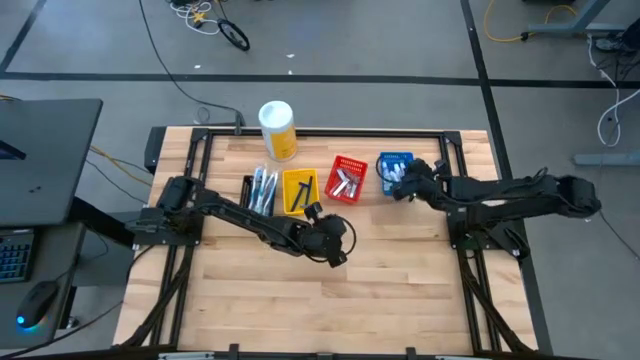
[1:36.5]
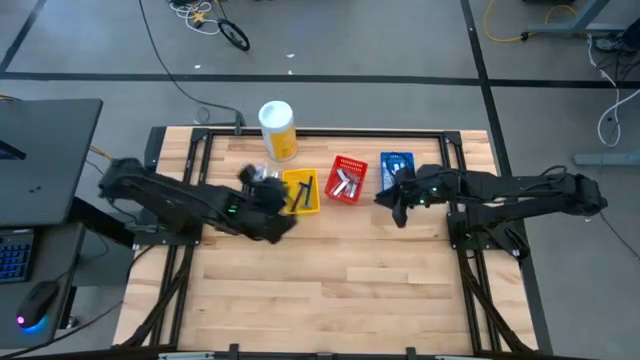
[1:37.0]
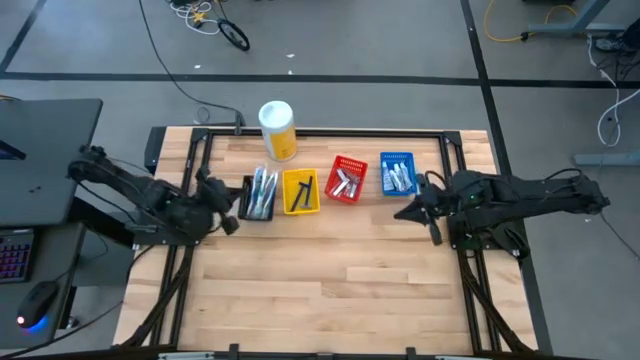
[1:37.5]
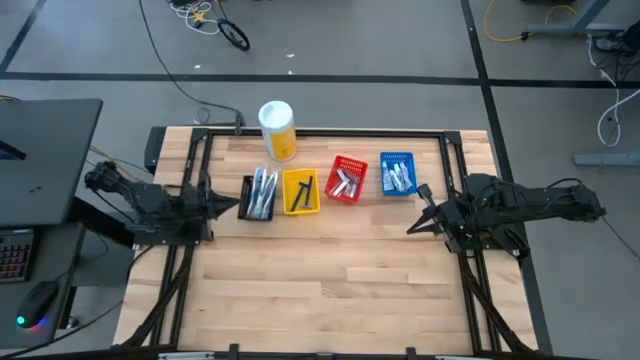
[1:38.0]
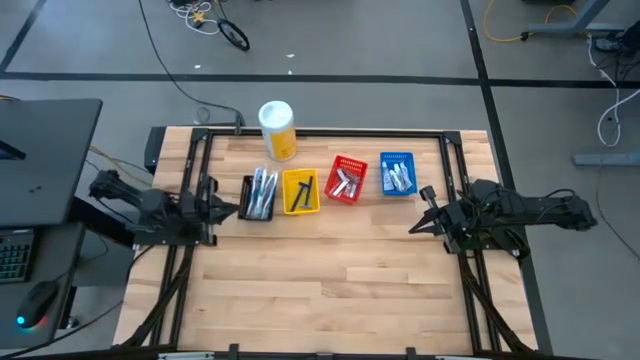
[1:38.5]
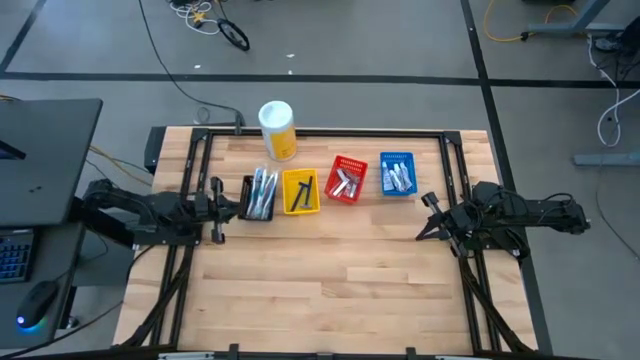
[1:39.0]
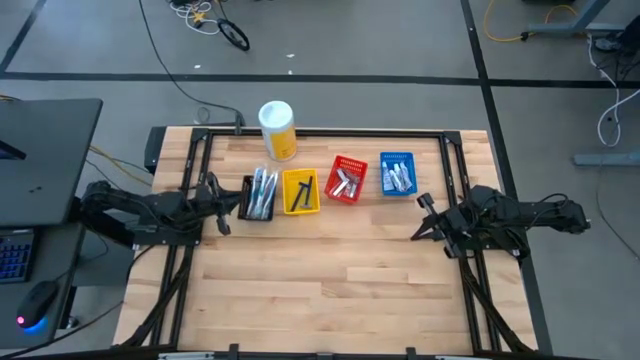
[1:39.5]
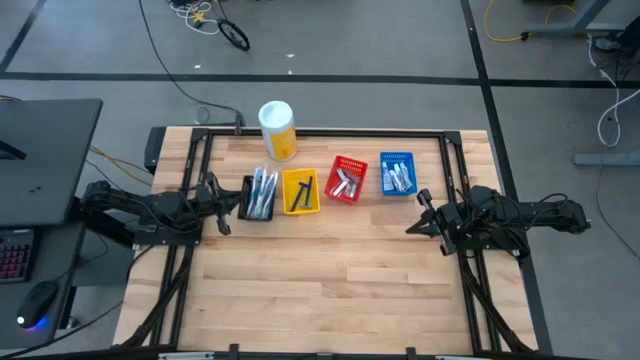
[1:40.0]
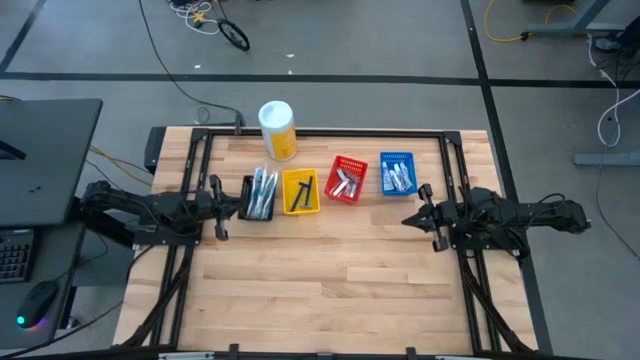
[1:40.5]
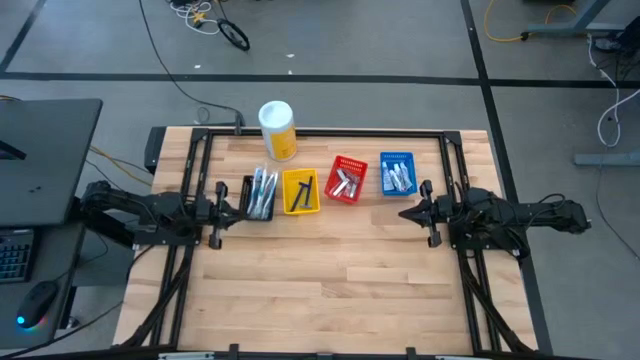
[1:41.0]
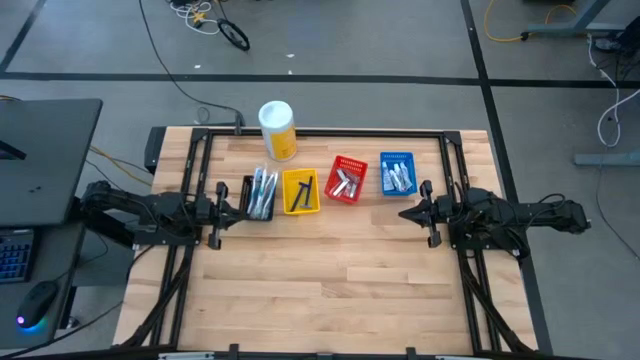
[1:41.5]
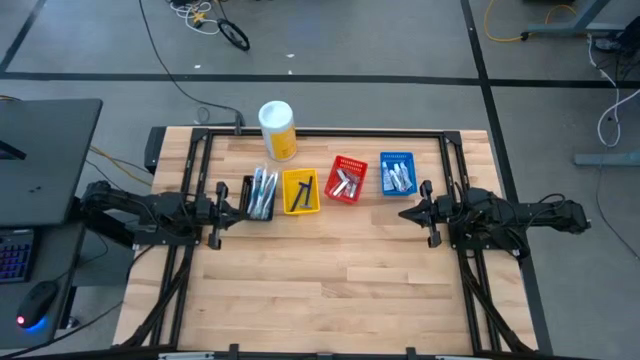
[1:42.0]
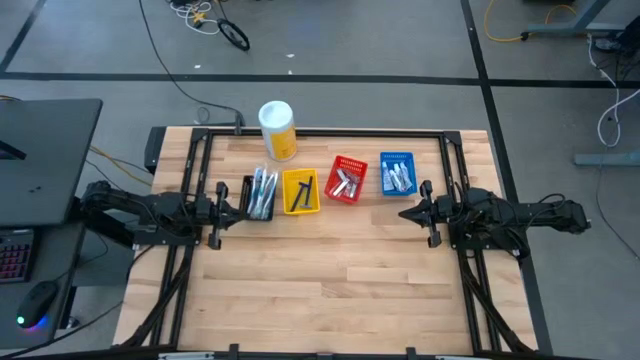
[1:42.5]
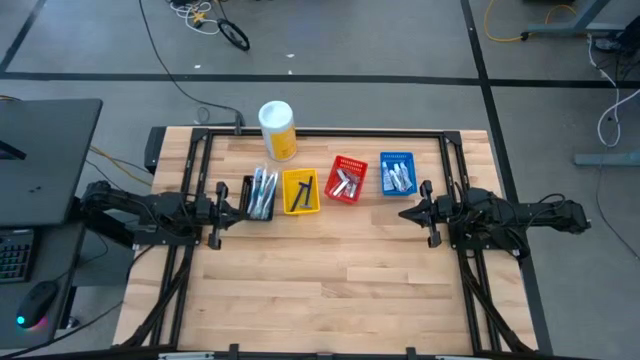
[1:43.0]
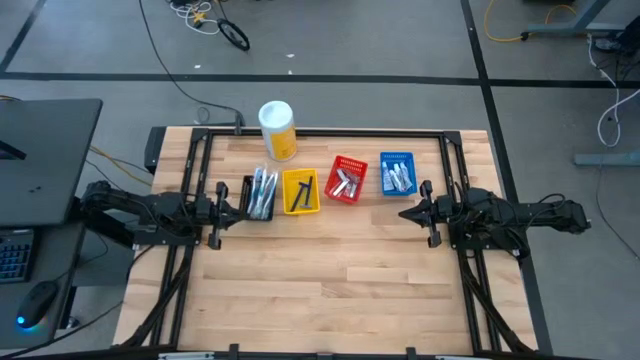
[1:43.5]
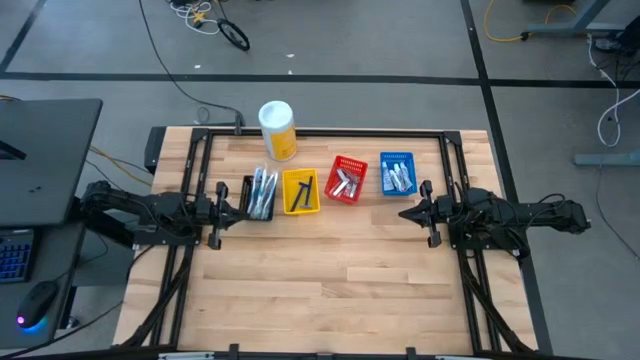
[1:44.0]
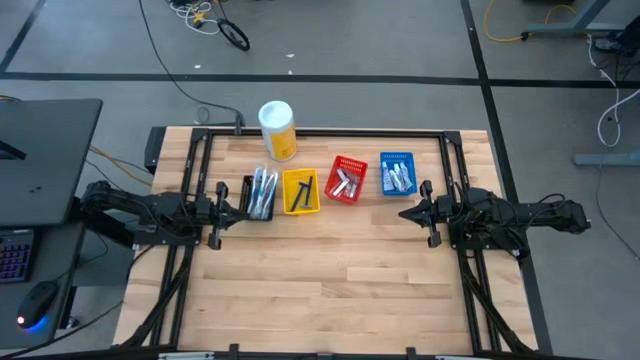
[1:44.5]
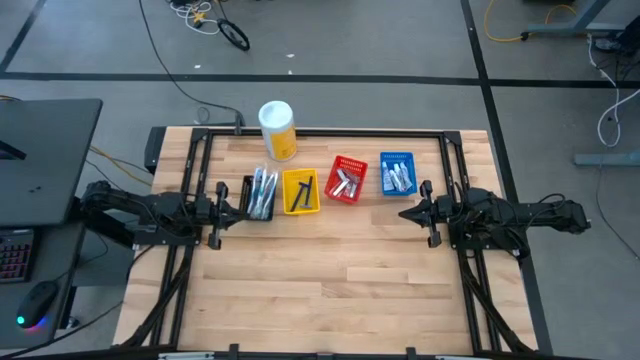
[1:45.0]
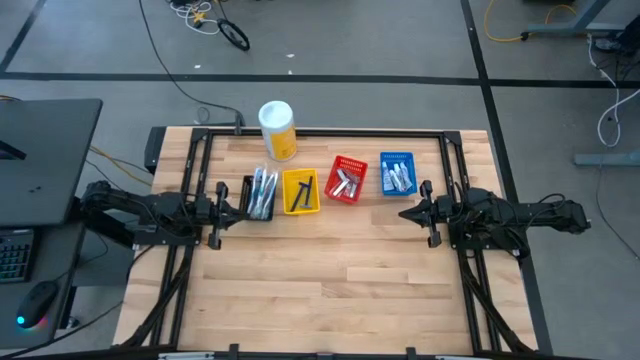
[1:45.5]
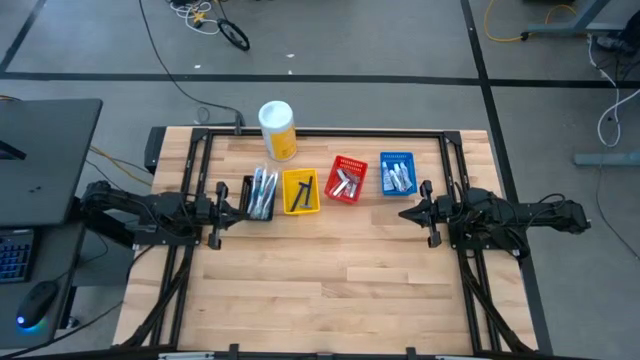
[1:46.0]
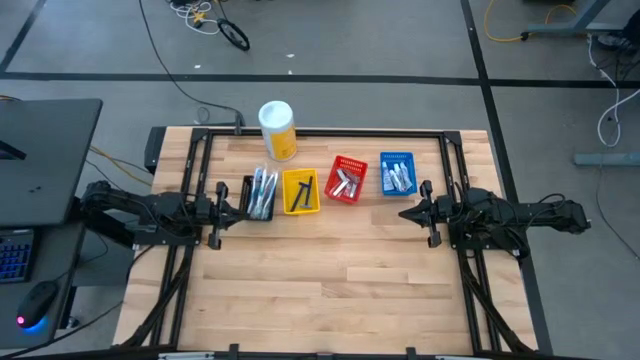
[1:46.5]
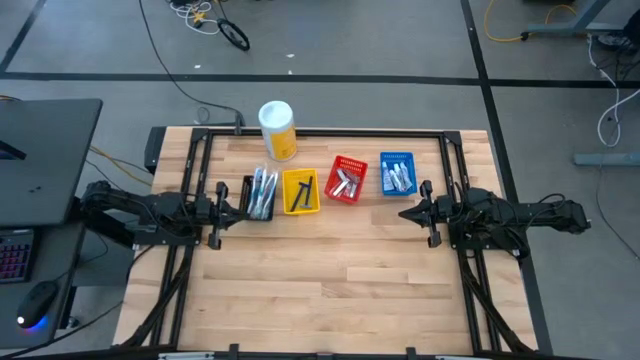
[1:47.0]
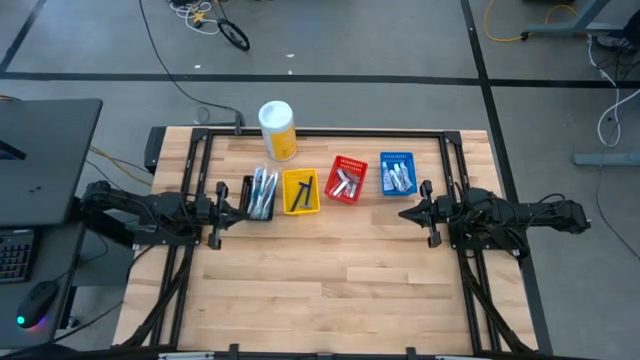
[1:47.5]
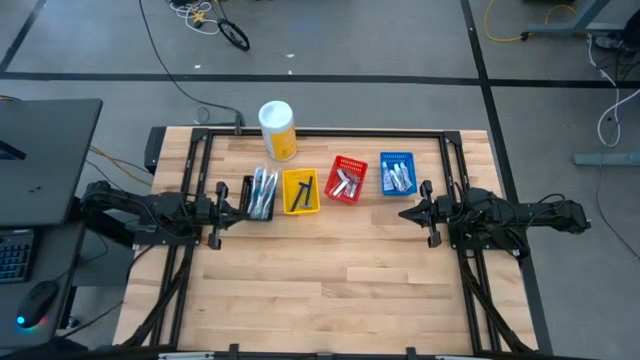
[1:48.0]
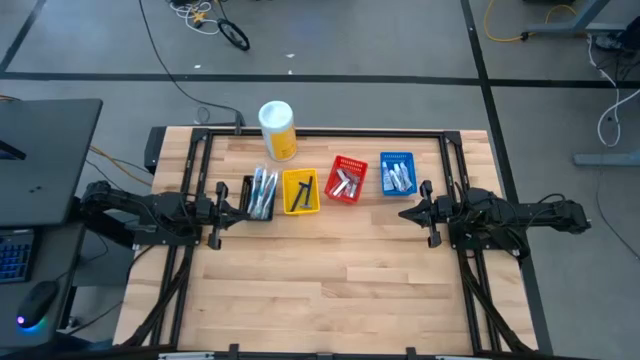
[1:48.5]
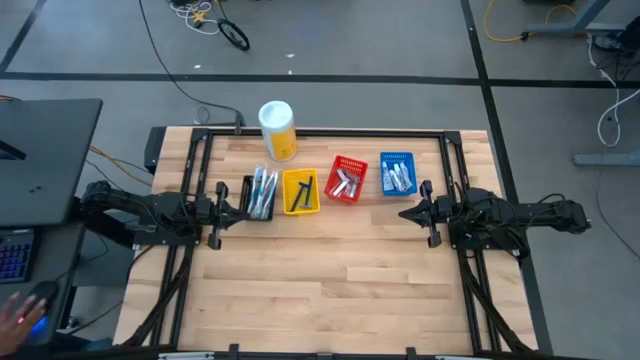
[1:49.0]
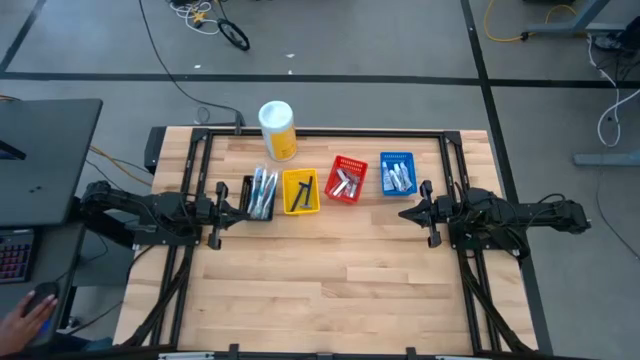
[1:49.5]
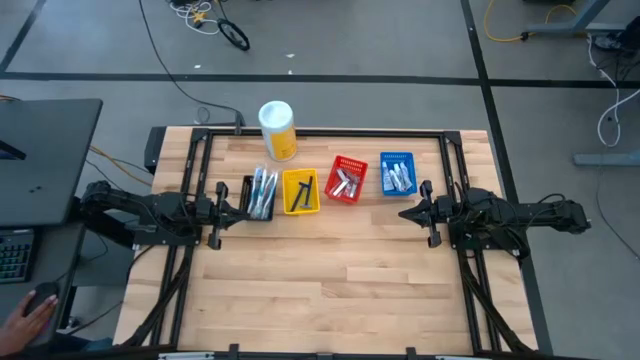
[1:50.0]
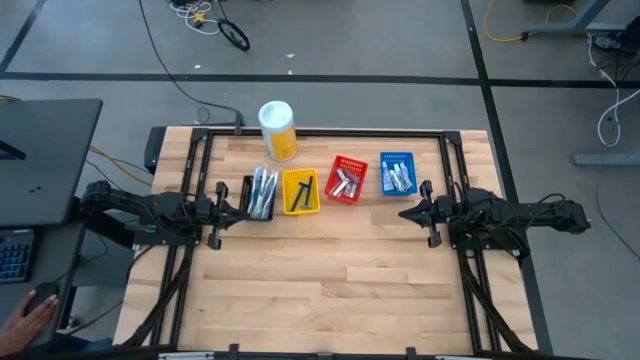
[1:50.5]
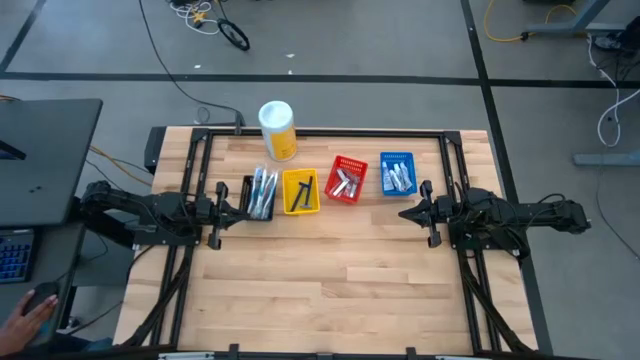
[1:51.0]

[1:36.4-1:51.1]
Task: Pick & Place Travel size toiletries
Return to Home Position

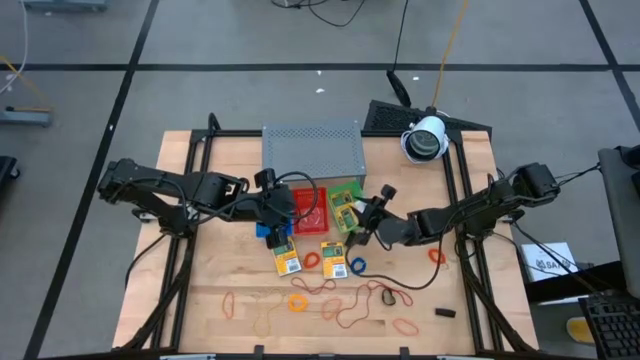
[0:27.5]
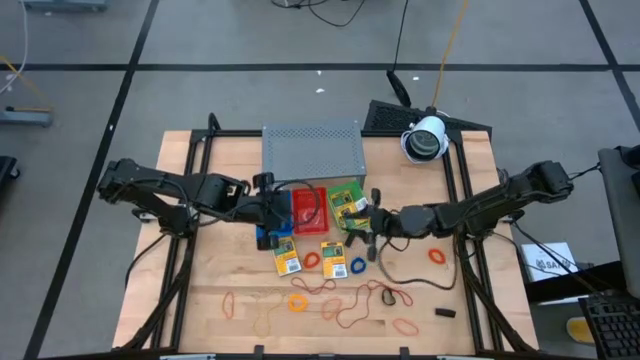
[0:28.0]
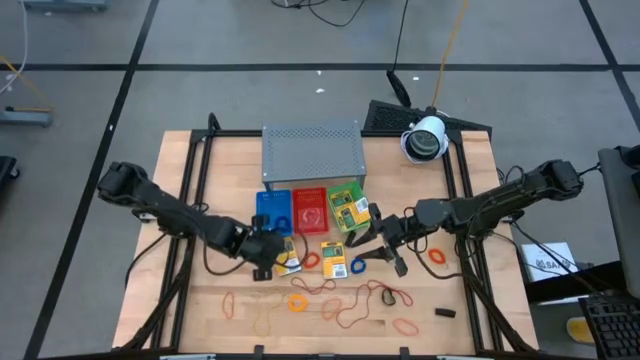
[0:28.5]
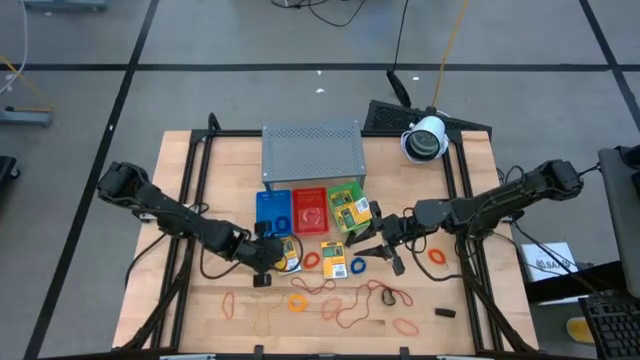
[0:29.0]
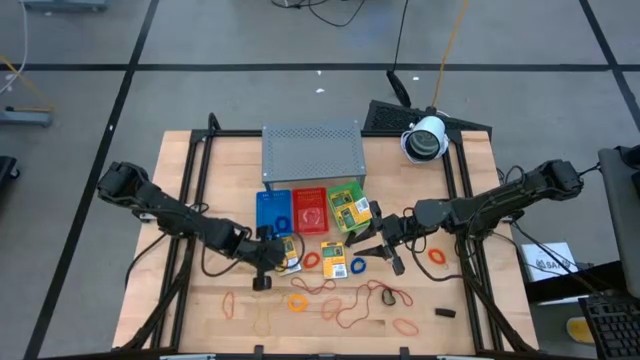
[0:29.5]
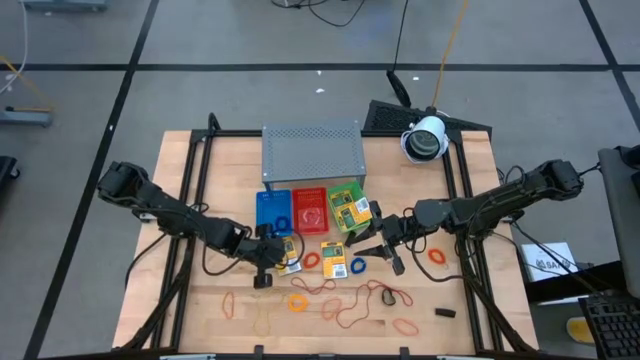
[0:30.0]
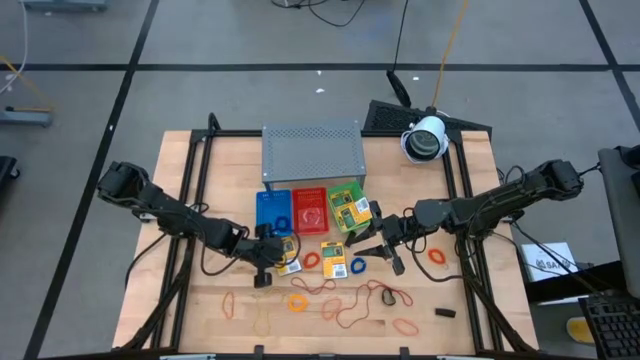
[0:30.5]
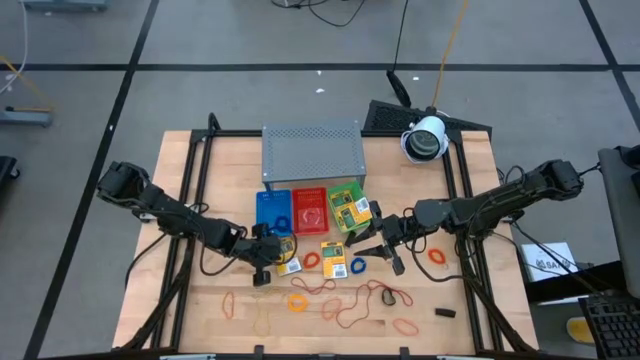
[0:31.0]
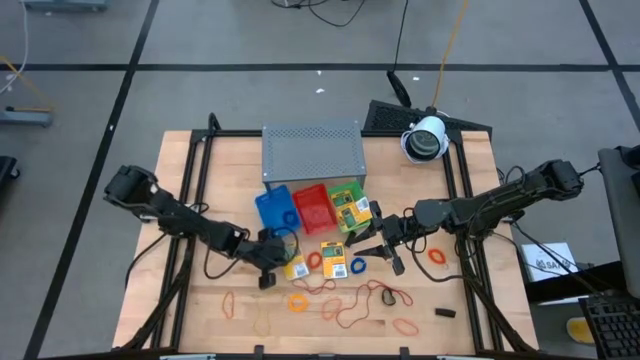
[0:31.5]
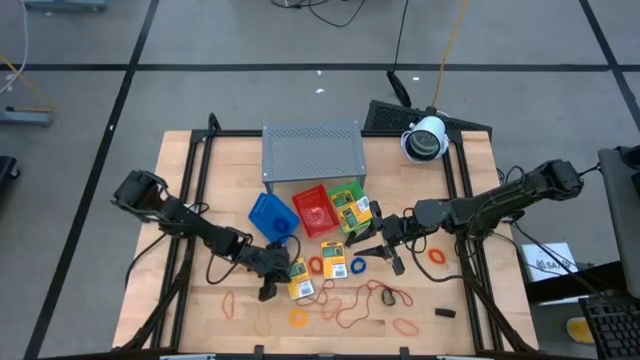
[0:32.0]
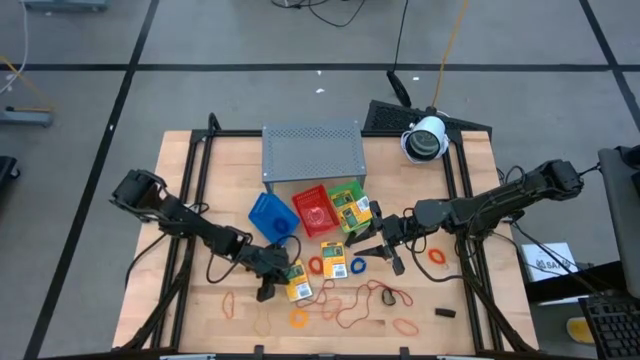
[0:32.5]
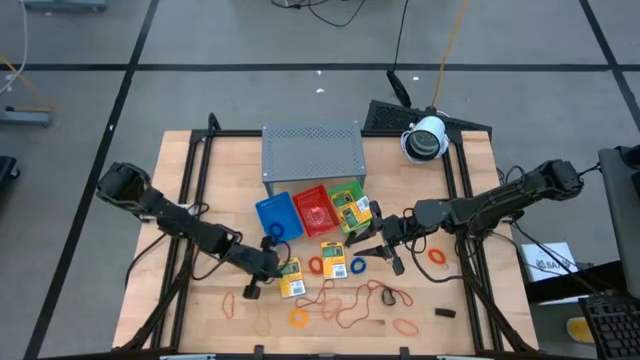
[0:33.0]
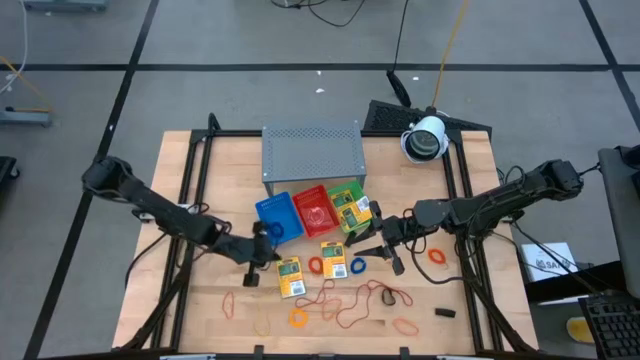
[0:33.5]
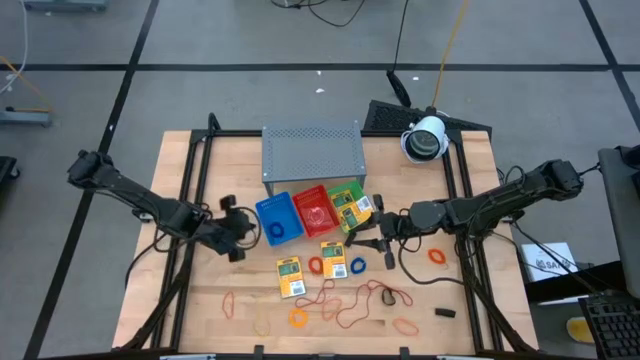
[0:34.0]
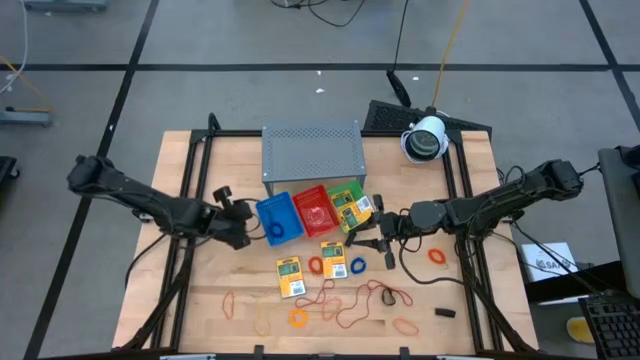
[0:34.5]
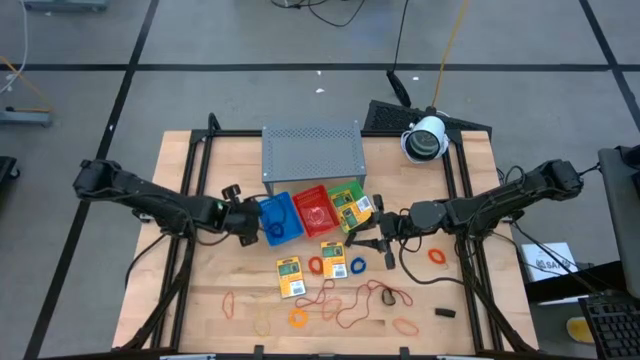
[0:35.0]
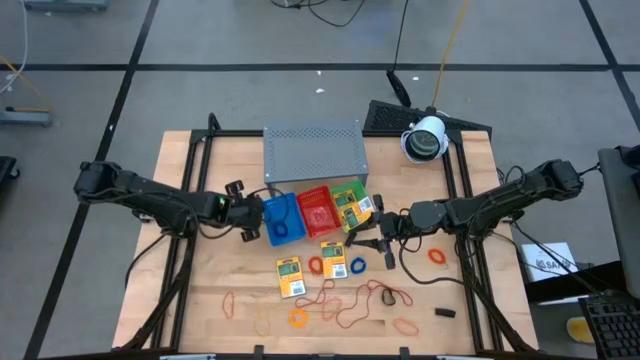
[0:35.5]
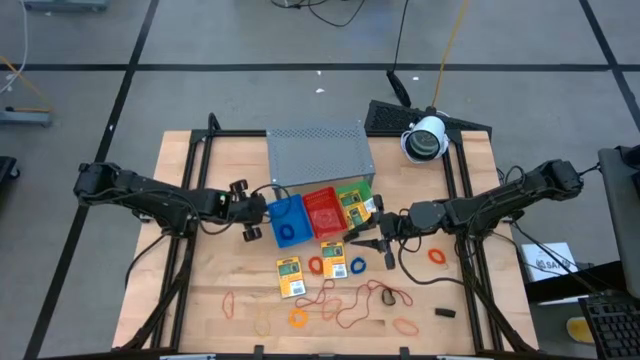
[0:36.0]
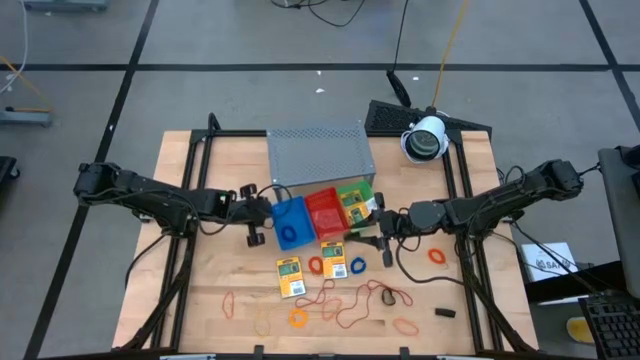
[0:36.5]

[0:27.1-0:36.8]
Task: Pick & Place Office Desk Supplies
Adjust the blue bin
